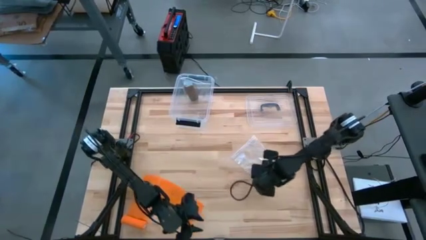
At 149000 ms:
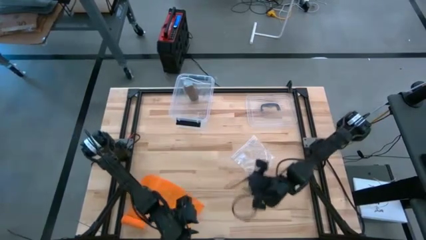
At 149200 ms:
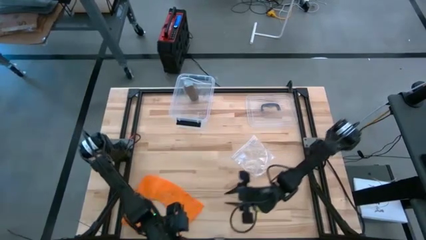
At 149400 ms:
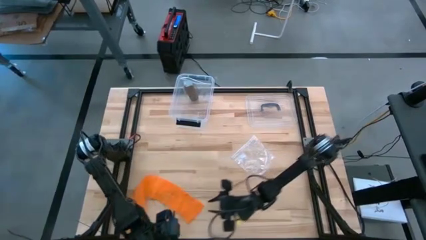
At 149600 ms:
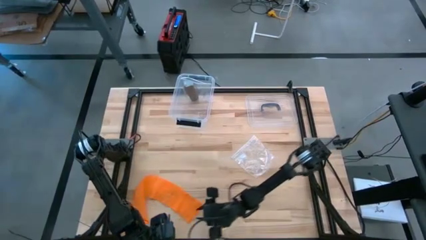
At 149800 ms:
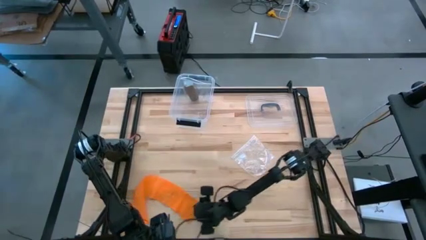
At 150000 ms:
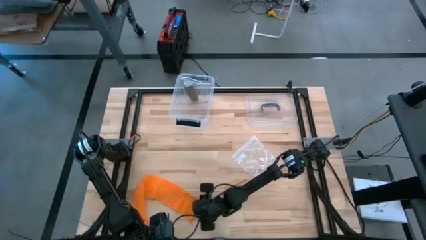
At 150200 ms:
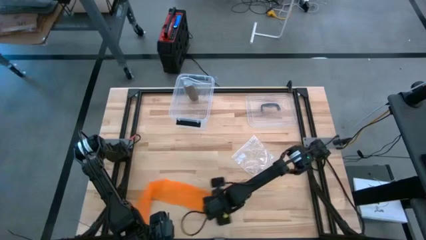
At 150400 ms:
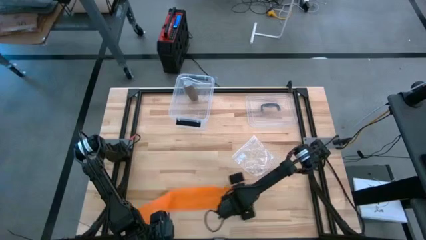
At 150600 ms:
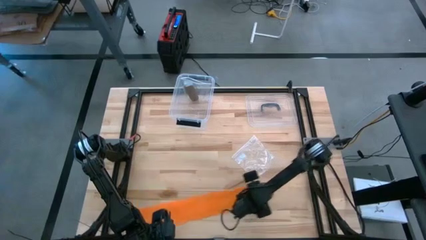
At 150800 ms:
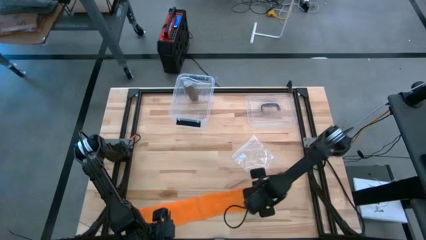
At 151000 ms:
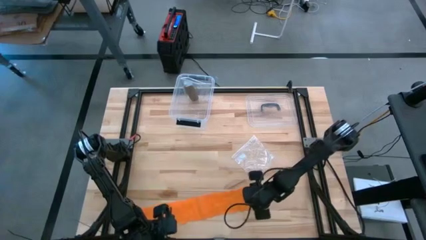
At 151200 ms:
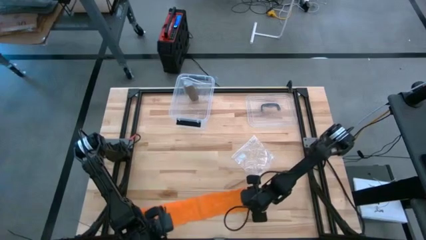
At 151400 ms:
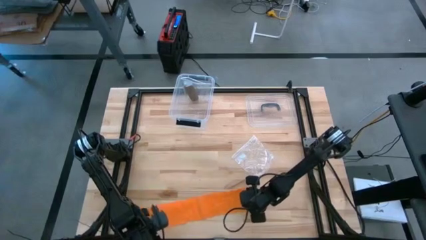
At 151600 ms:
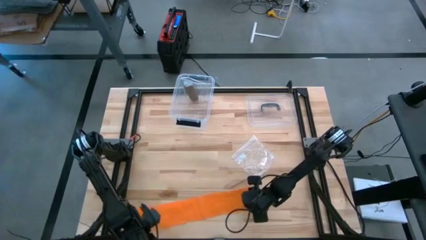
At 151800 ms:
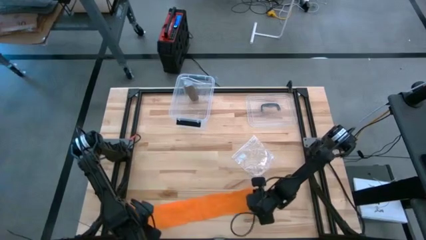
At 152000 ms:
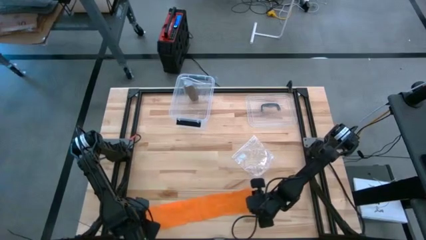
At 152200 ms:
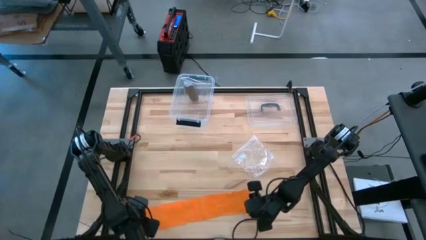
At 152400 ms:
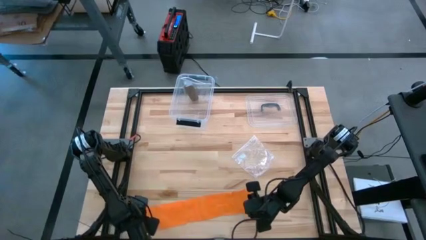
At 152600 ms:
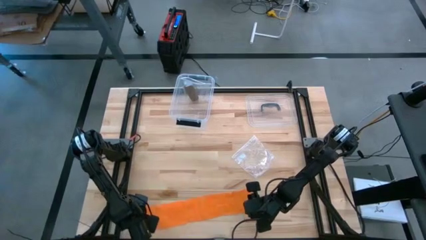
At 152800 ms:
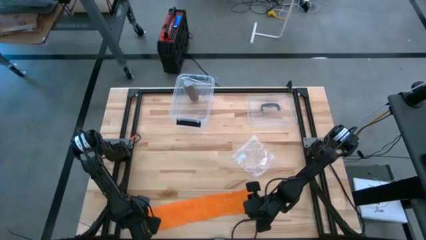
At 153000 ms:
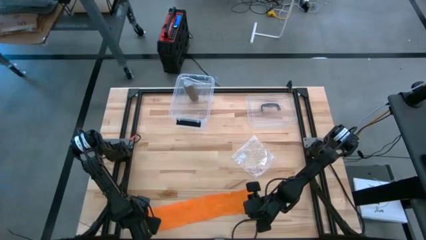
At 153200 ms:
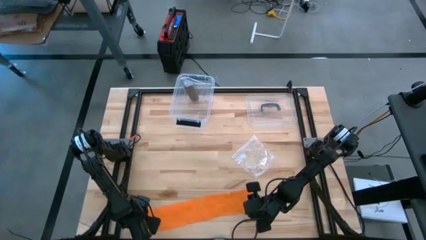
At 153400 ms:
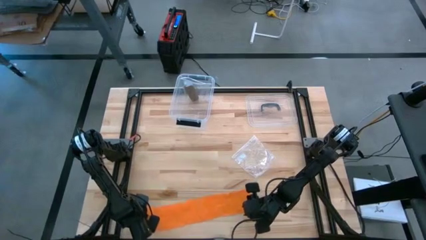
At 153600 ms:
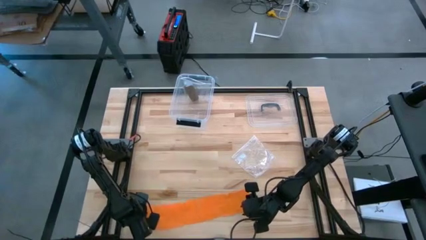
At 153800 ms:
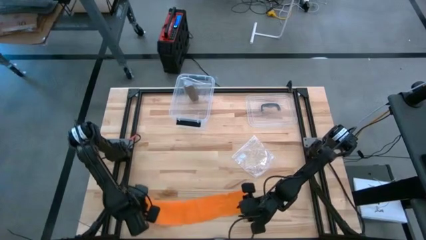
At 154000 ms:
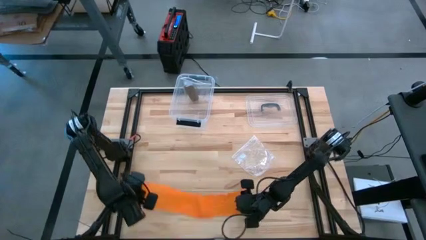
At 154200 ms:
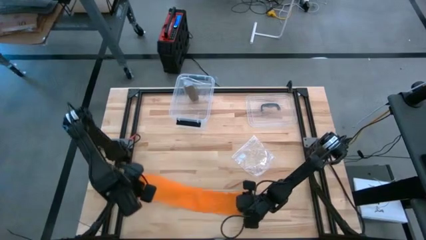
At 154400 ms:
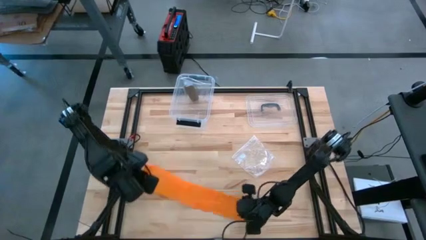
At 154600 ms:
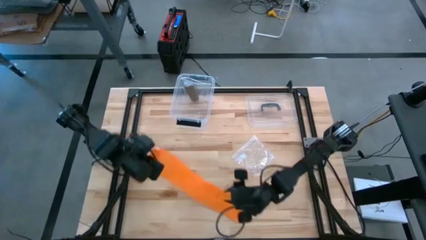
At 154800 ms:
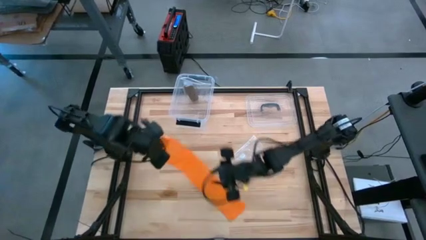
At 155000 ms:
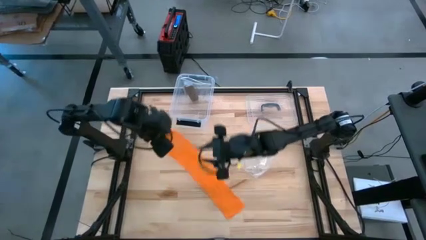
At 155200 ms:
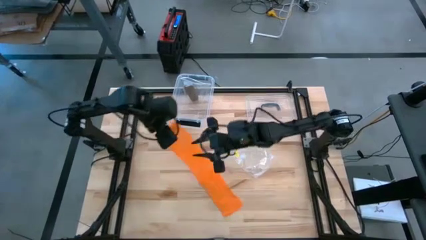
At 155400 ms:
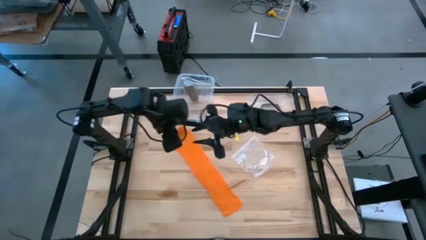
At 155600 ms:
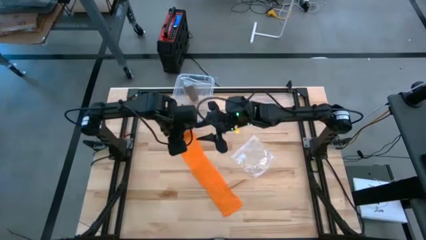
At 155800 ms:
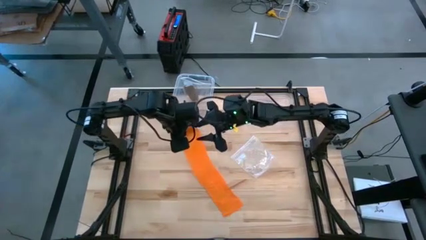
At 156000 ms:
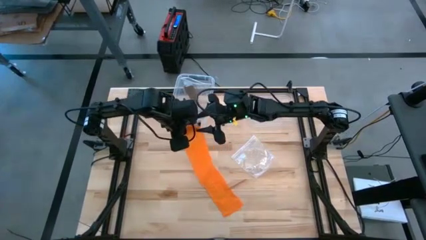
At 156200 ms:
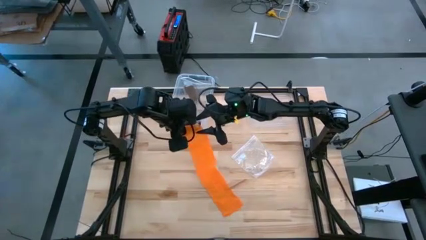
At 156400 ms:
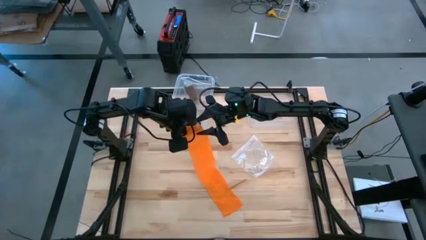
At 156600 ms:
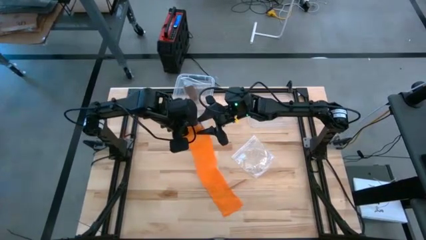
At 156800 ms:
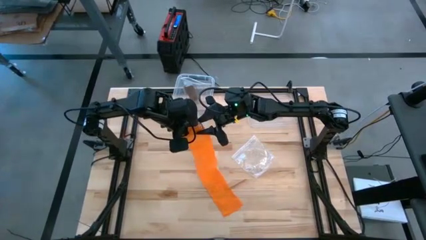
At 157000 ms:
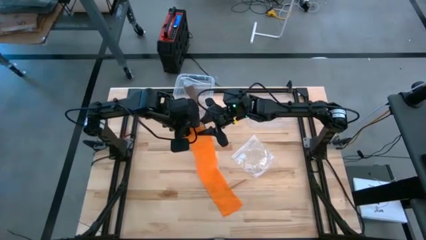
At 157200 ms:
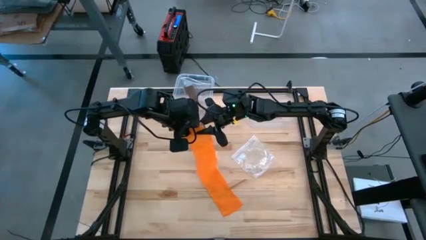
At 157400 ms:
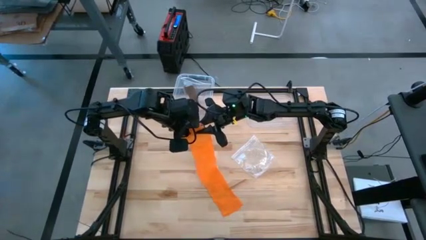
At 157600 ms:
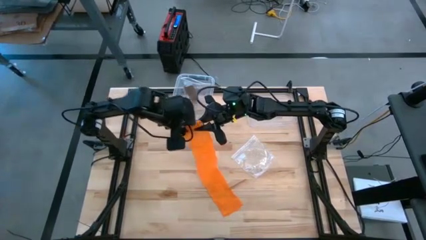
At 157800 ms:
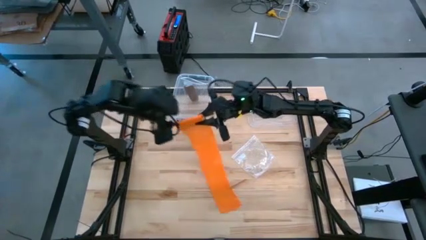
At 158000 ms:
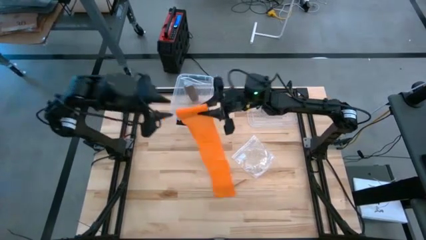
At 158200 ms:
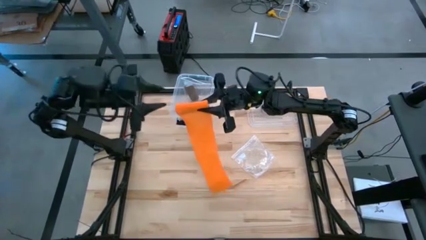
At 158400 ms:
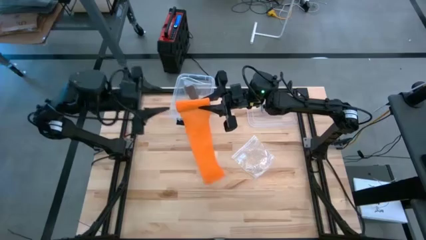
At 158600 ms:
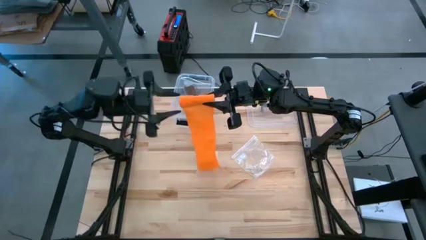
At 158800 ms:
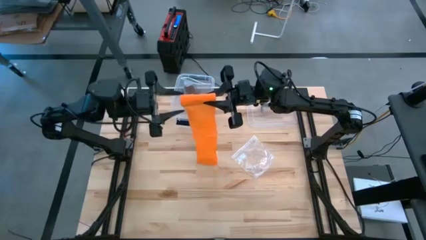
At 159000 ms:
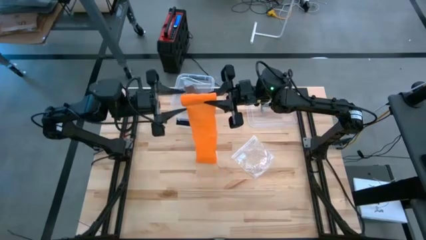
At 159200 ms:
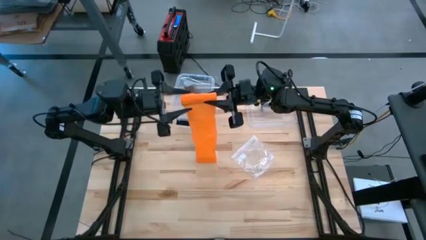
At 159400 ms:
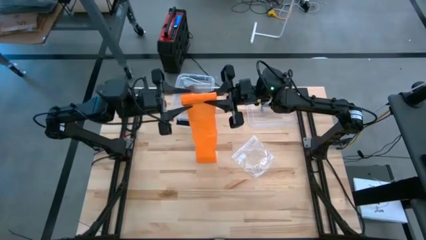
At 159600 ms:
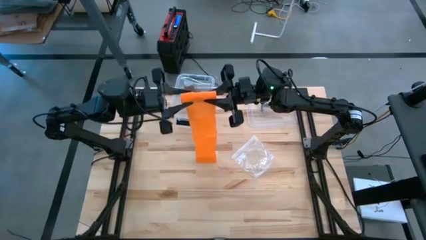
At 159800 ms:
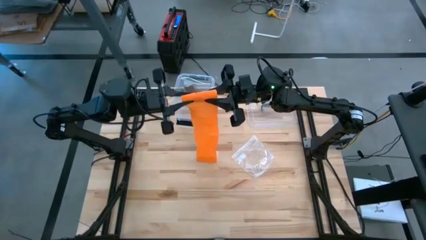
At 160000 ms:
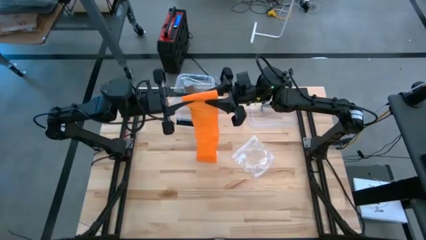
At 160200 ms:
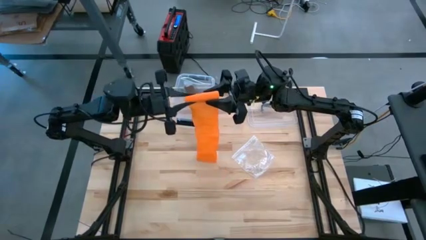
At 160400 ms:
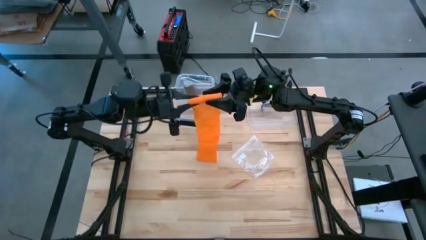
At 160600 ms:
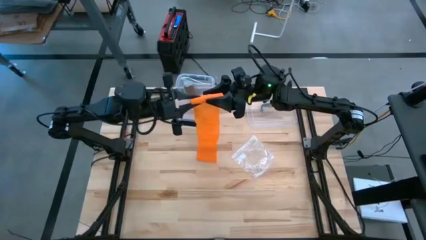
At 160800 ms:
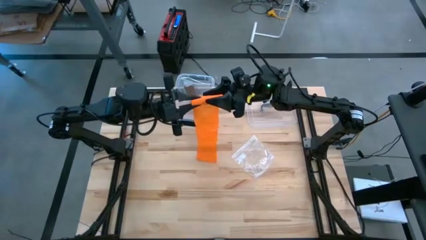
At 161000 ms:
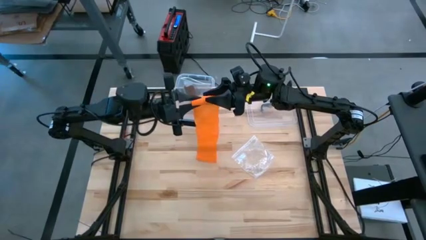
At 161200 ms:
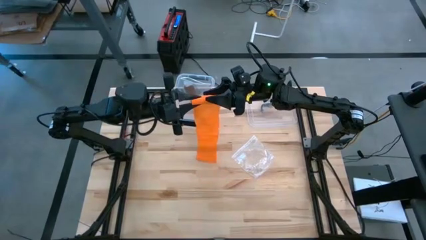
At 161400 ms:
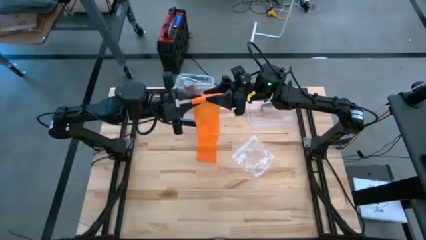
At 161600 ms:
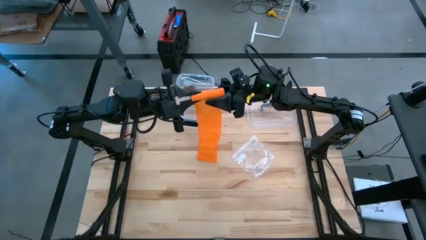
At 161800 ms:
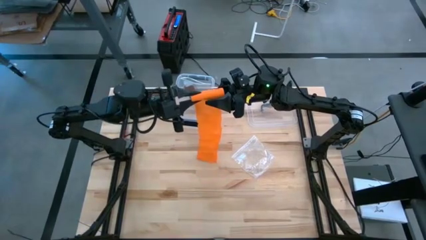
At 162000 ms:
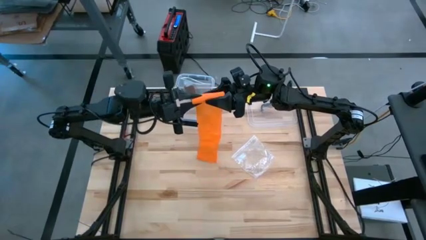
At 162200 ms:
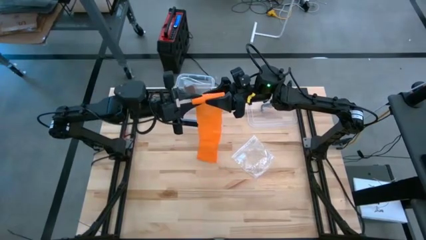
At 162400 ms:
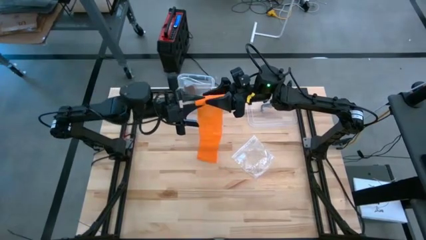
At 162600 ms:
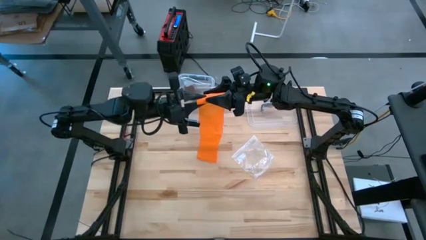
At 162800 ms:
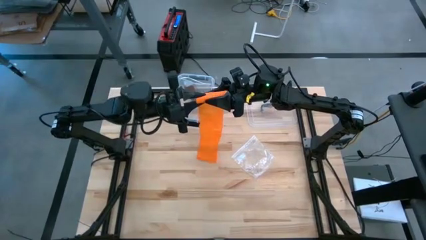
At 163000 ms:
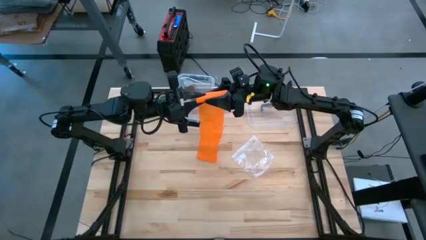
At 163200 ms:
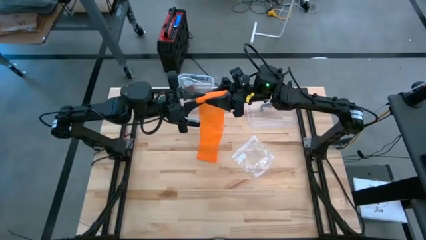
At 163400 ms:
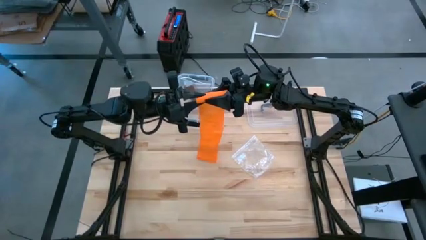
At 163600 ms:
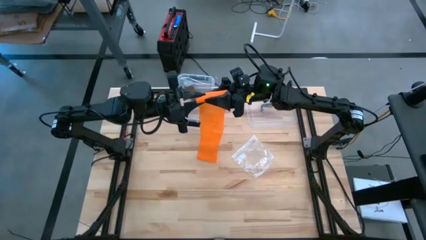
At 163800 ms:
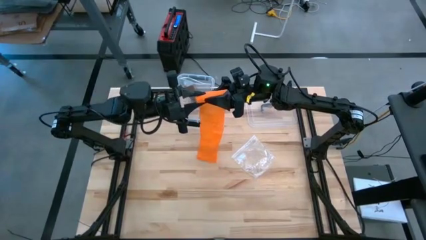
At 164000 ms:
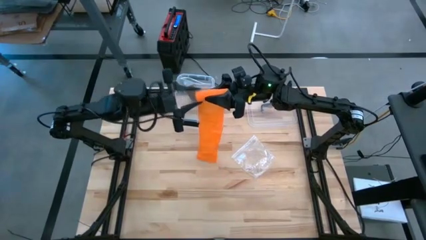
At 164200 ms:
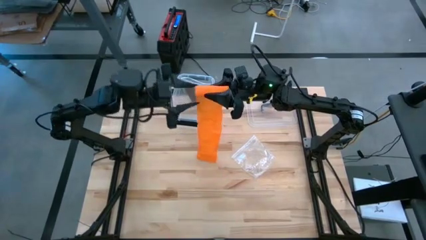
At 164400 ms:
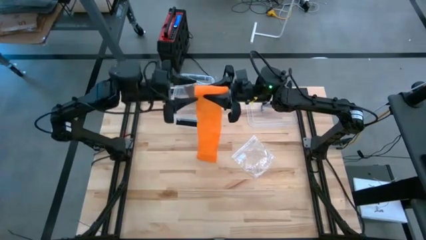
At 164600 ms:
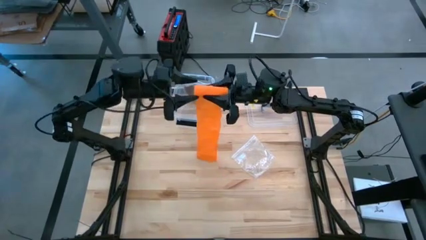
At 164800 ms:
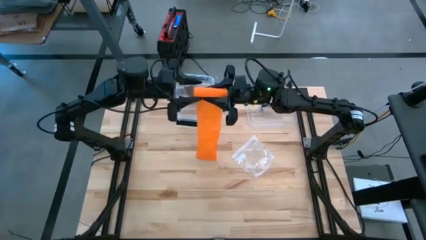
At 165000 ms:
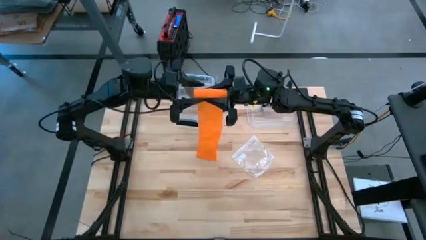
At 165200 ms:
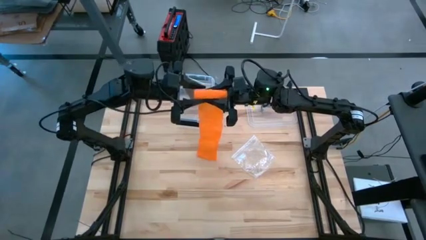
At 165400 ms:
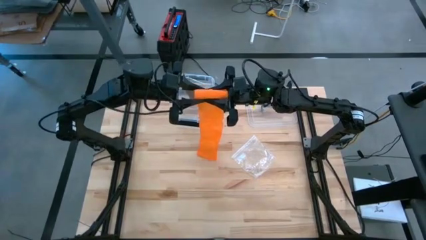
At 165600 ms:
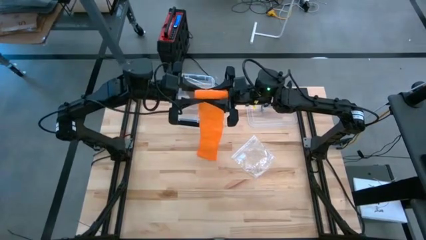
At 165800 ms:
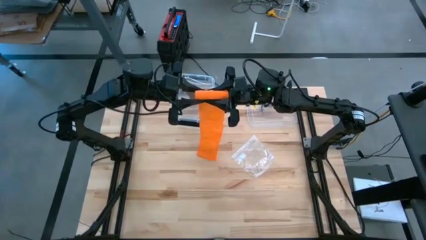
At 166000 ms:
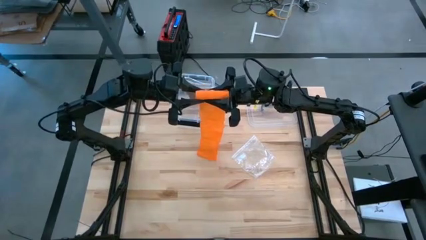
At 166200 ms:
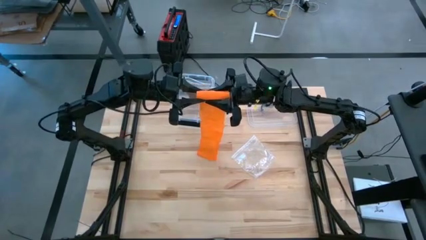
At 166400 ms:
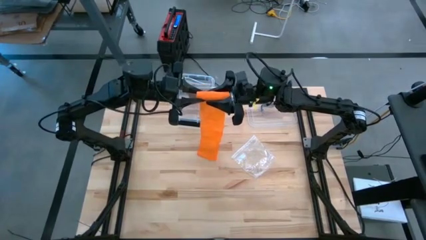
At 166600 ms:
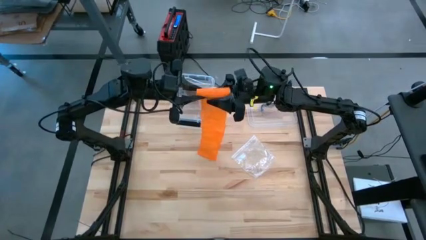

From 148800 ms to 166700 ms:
Task: Roll bandage
Roll the orange bandage
